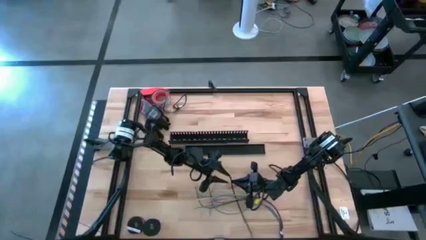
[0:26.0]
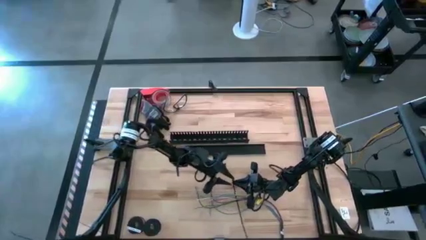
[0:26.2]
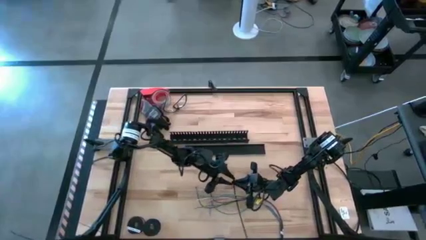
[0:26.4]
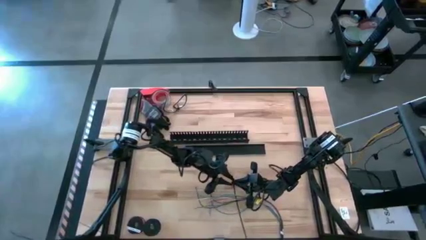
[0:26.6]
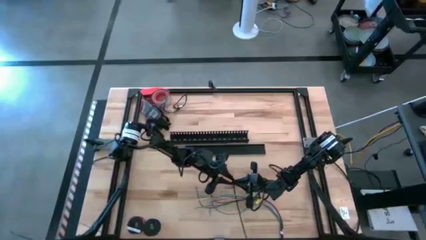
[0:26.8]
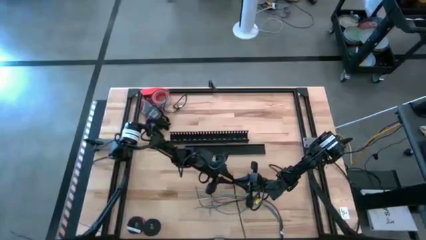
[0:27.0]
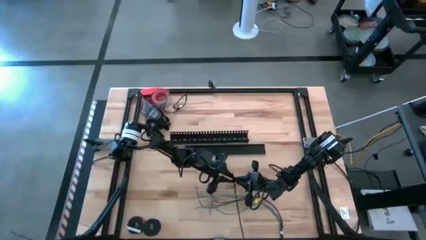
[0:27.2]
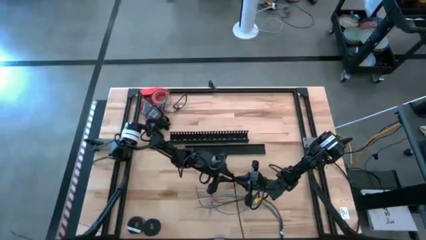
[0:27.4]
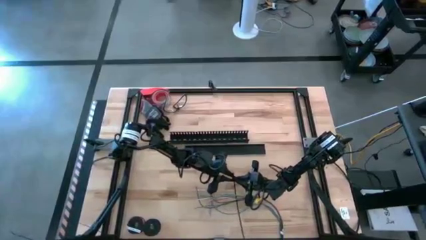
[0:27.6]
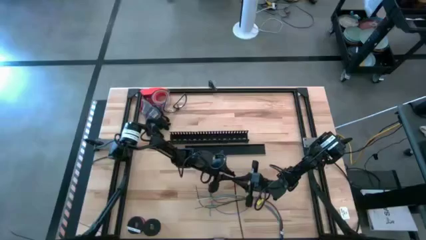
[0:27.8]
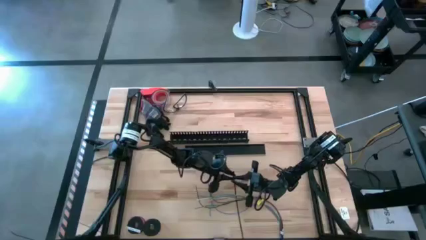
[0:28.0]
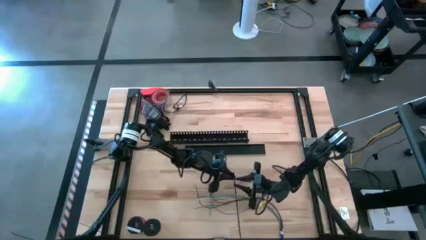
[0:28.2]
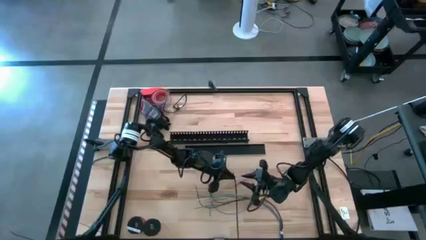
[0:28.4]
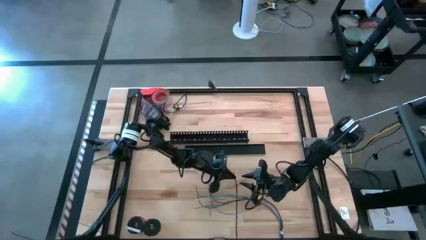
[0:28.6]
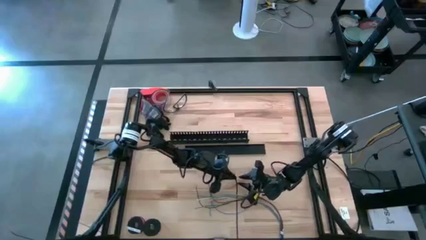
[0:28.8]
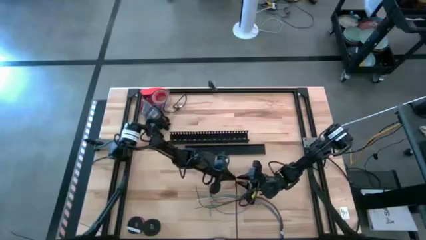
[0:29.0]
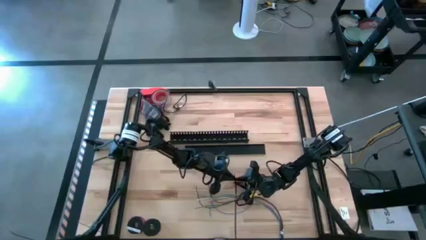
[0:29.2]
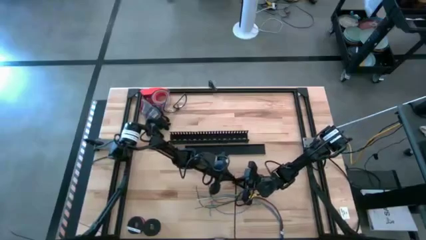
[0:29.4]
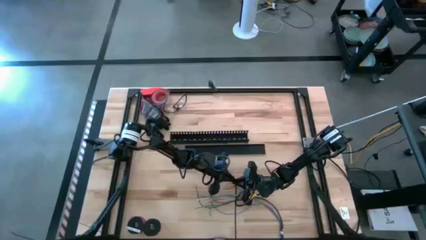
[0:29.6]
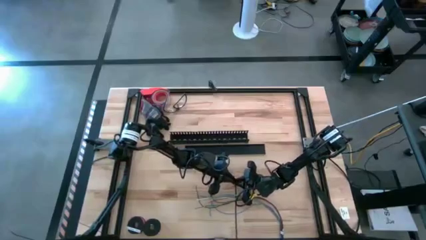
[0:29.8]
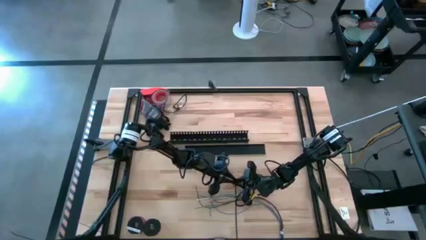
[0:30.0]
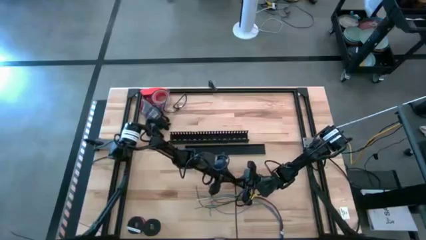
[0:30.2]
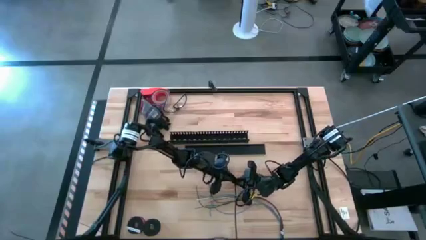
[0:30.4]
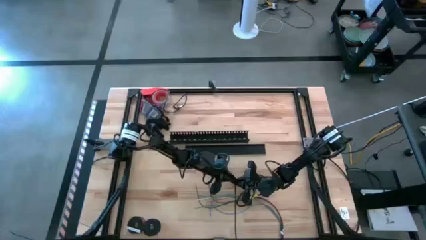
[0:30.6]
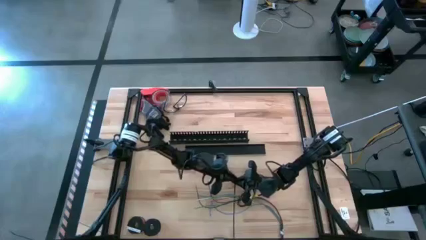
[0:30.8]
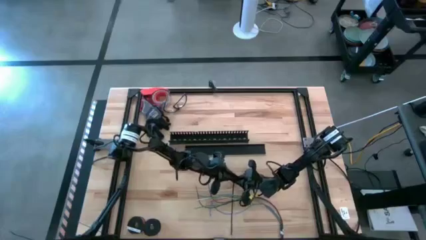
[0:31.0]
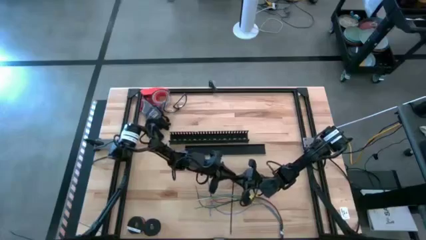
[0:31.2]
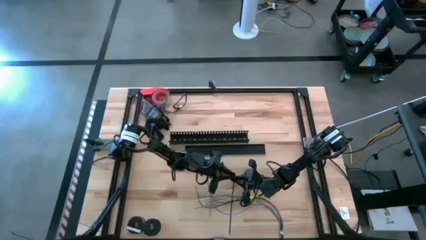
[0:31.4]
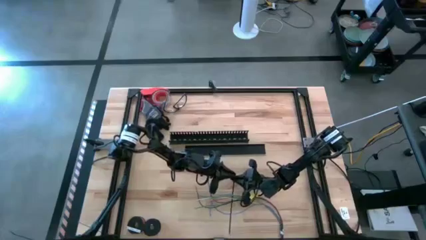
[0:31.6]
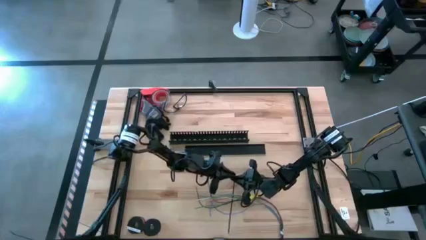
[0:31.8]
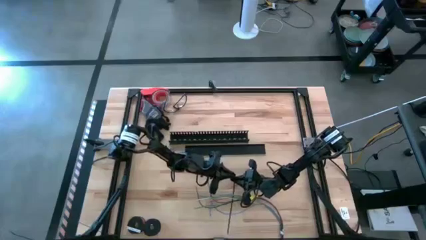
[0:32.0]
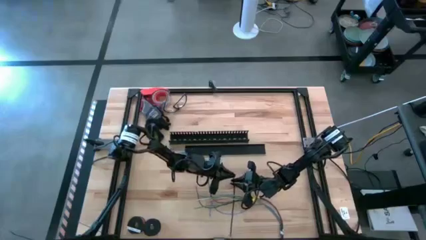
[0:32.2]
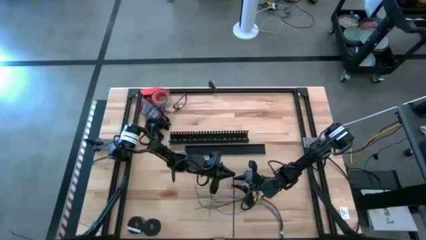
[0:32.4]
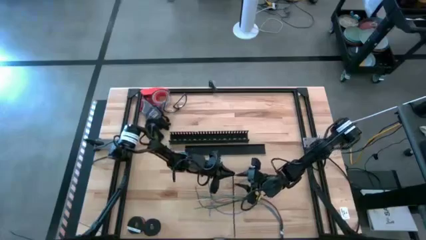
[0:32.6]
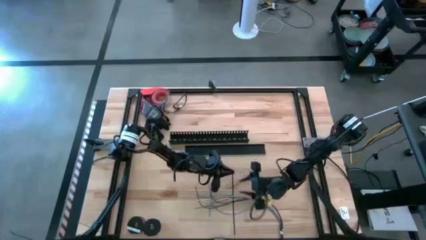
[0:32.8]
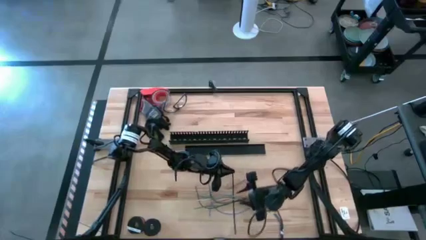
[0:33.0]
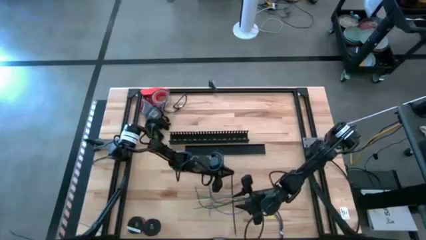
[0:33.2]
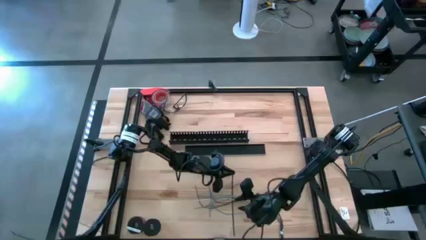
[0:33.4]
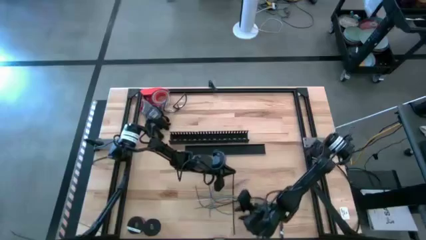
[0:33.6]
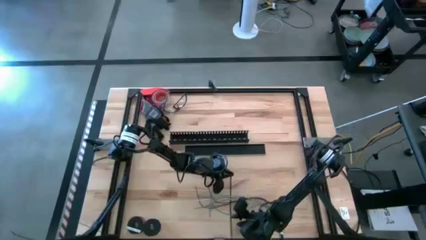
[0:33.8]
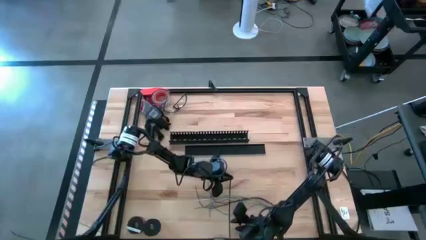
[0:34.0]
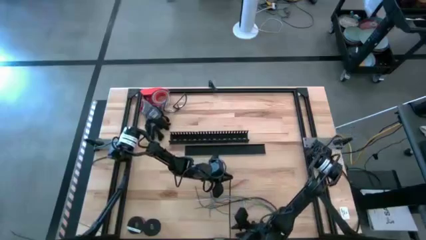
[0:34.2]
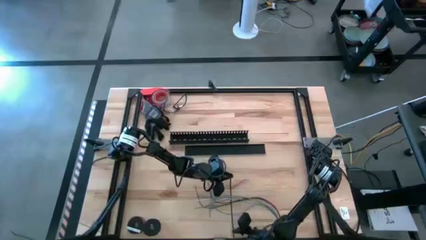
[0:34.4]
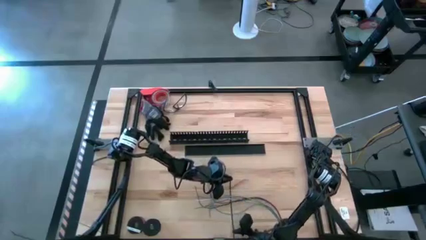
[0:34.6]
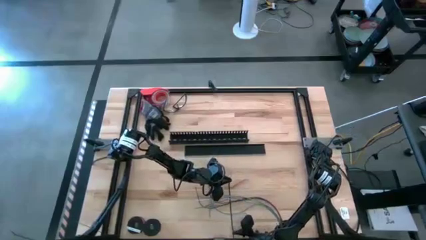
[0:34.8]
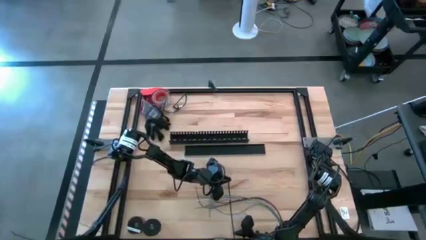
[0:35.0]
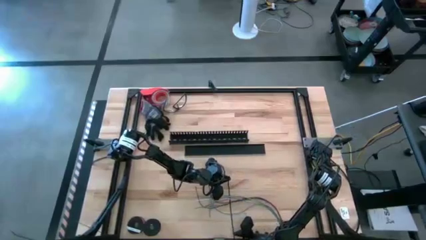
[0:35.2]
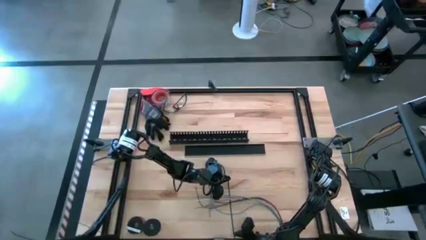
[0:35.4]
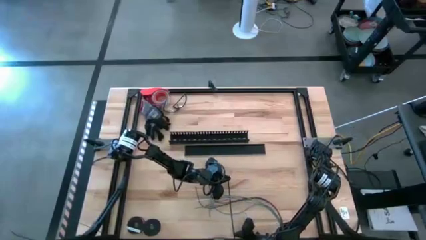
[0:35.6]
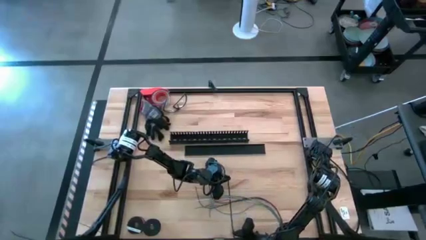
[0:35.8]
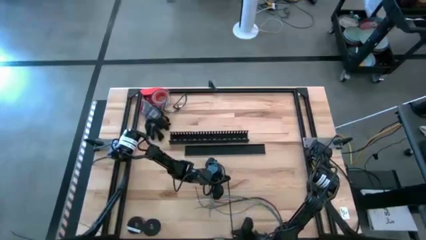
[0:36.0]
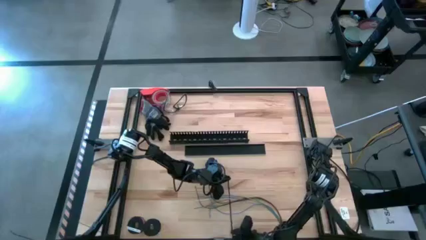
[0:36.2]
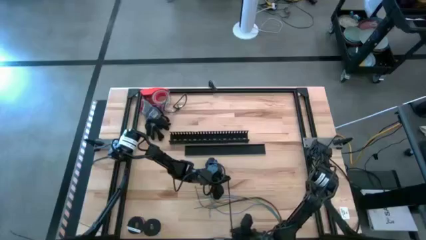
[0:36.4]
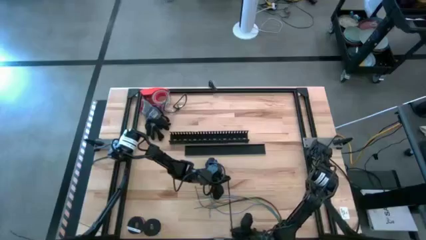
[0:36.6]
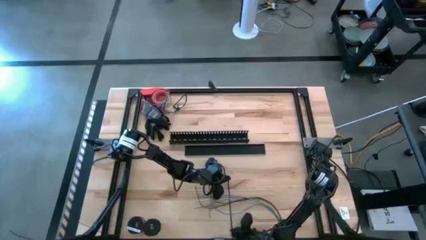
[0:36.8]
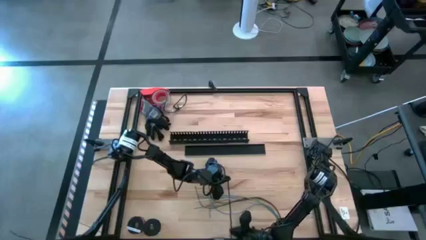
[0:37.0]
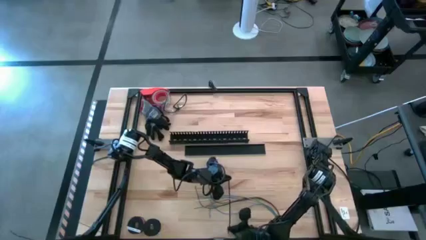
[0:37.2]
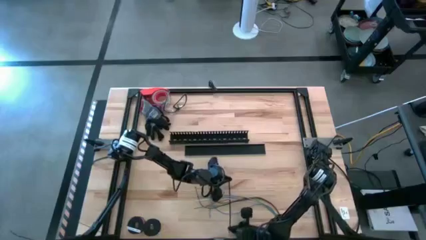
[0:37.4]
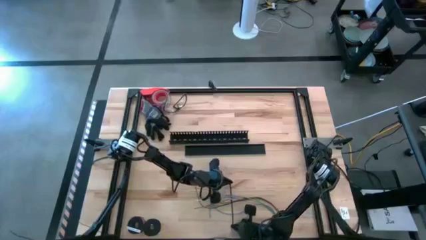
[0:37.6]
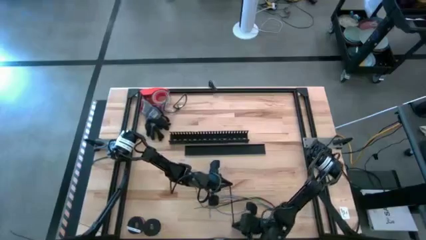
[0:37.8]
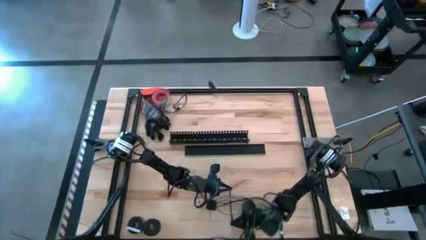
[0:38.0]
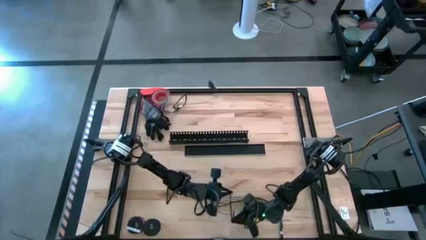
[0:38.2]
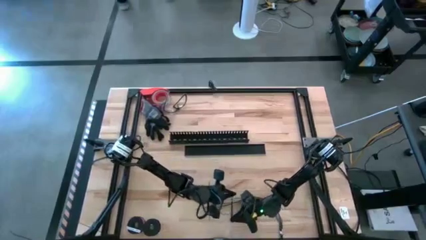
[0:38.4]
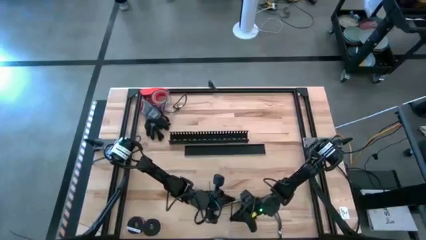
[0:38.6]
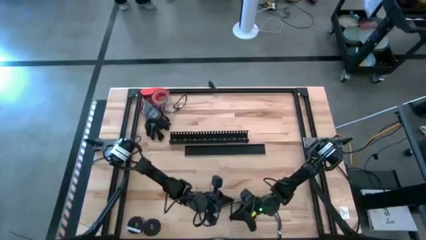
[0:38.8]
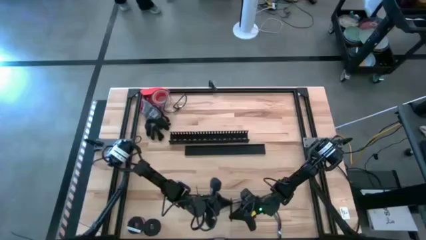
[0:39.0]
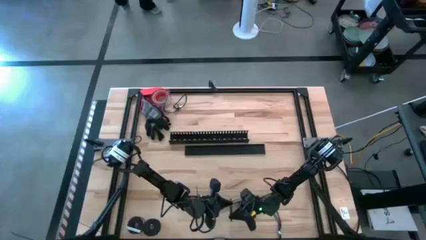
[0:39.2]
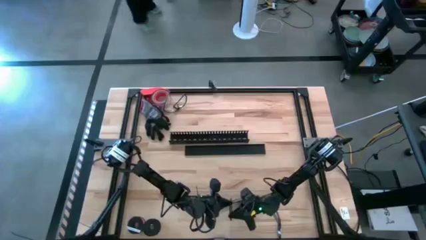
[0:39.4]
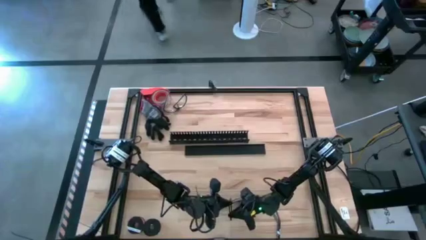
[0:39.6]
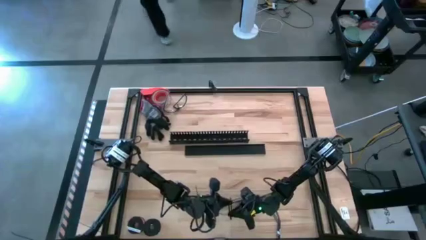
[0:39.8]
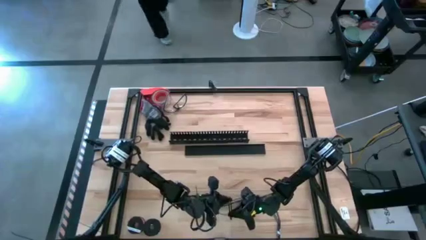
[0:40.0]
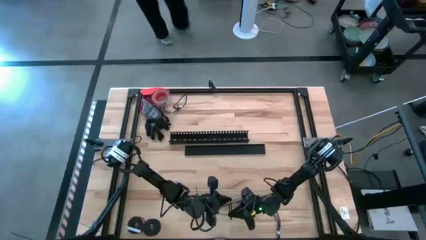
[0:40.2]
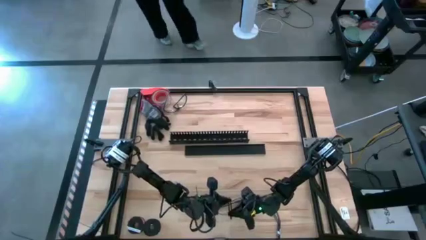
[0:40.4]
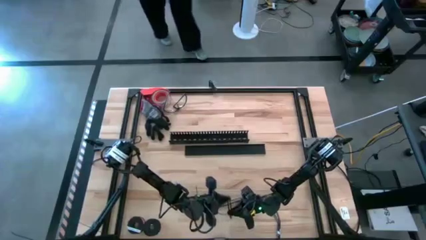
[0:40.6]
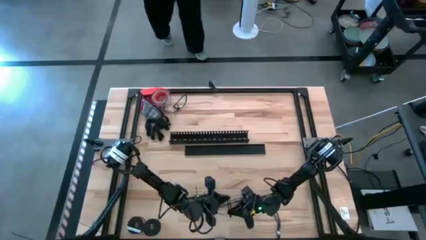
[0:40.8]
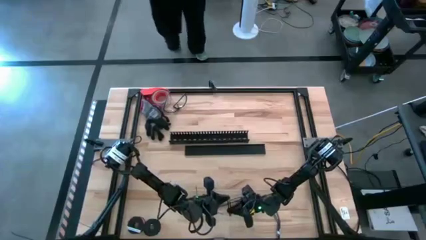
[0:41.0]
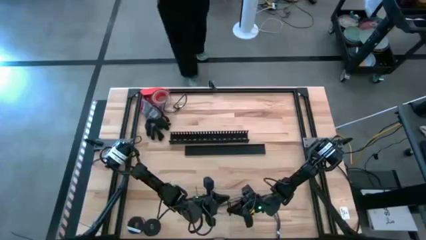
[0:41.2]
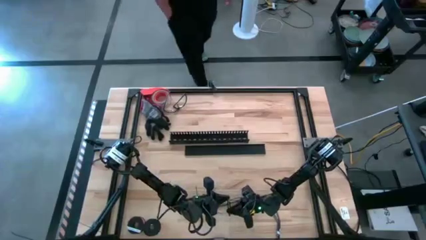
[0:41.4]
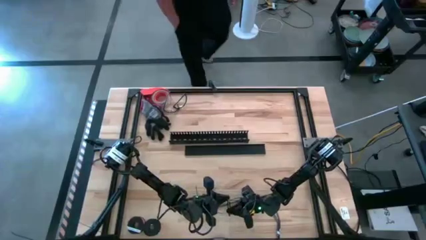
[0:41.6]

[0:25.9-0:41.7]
Task: Ziptie cables
Wrap the cable wires with the black zip tie
